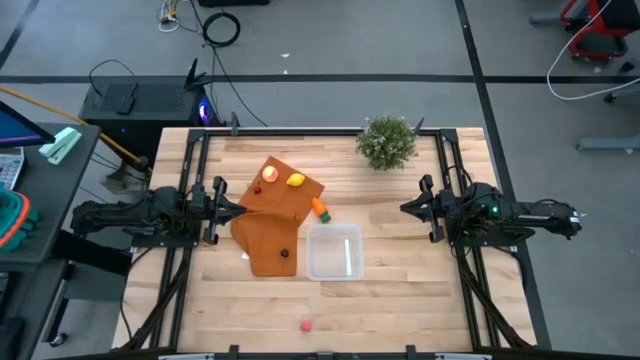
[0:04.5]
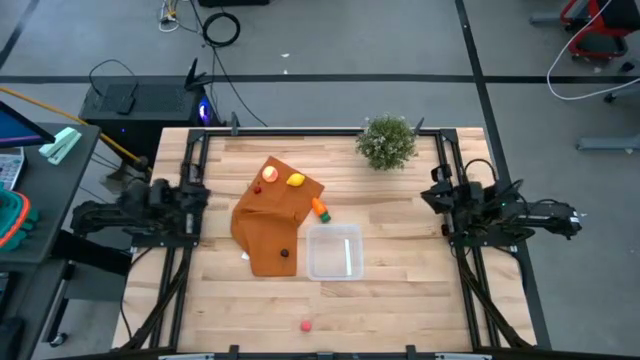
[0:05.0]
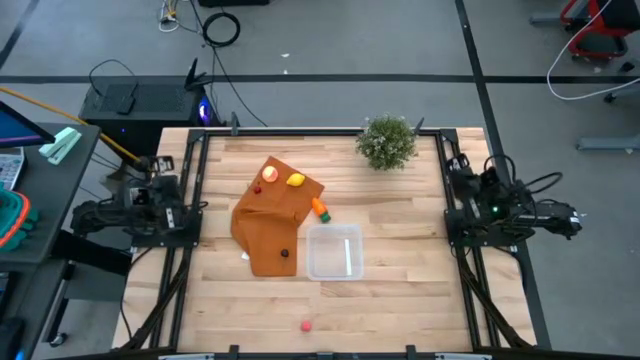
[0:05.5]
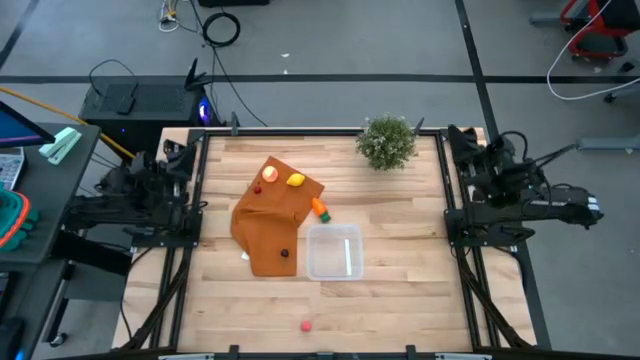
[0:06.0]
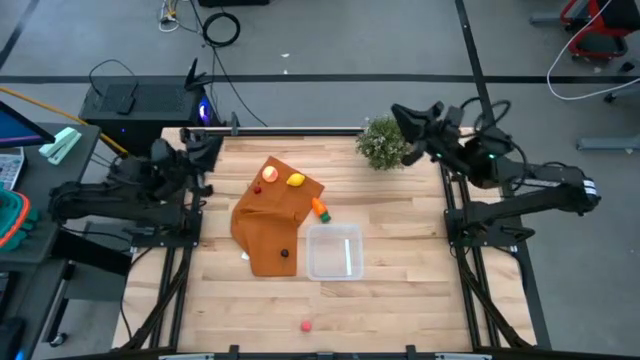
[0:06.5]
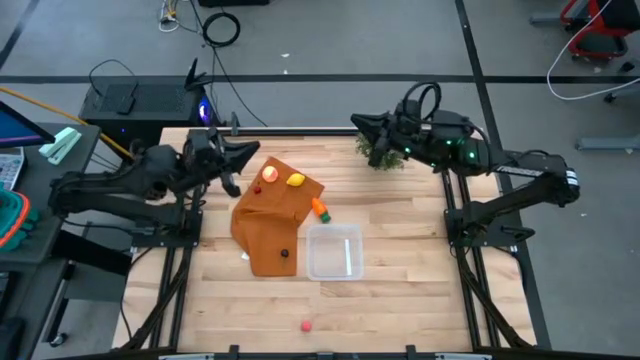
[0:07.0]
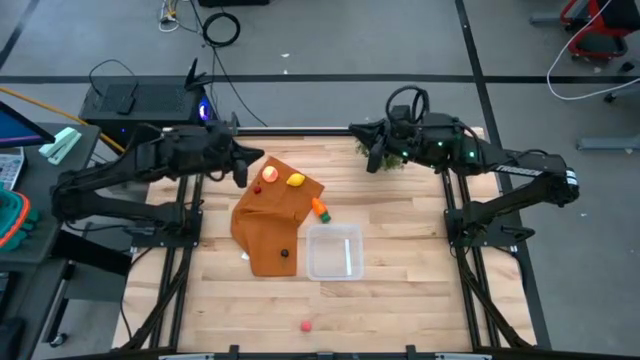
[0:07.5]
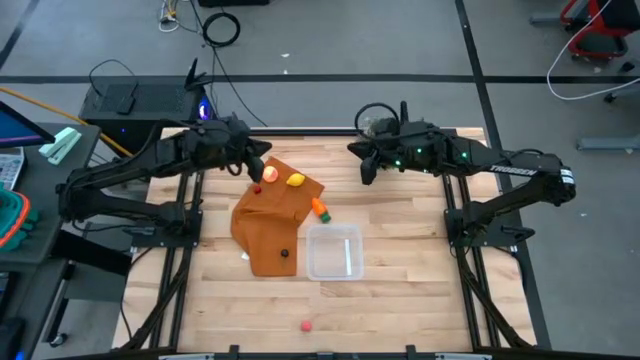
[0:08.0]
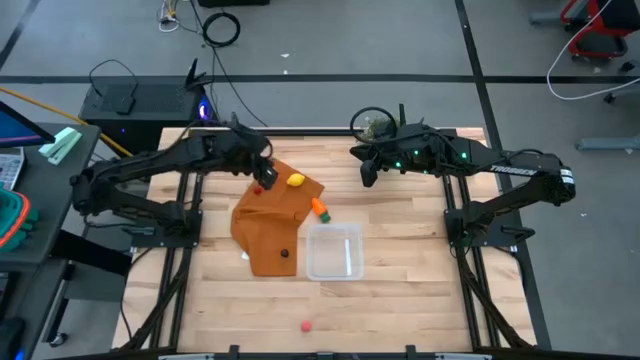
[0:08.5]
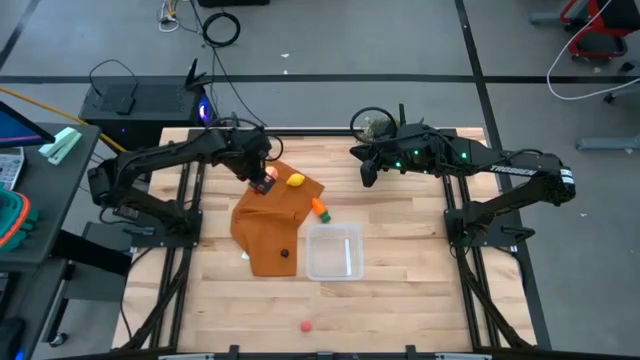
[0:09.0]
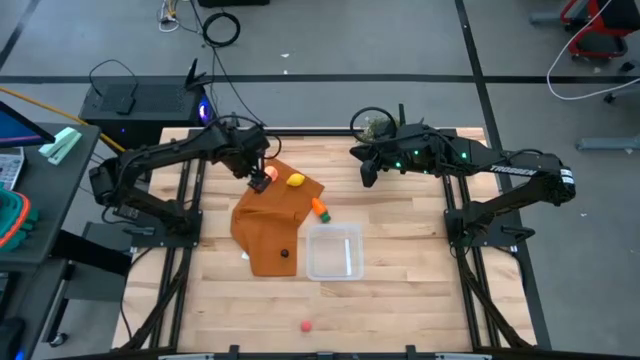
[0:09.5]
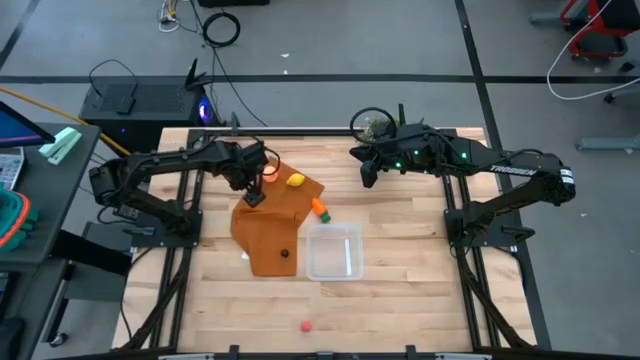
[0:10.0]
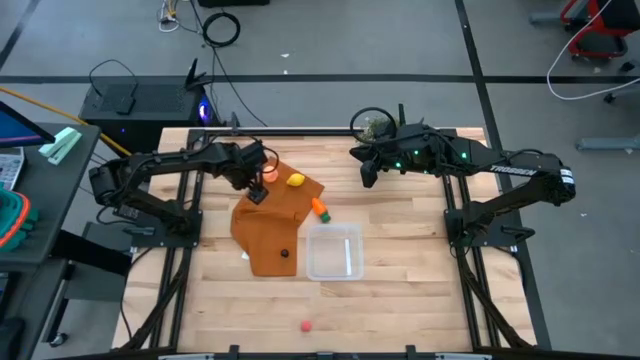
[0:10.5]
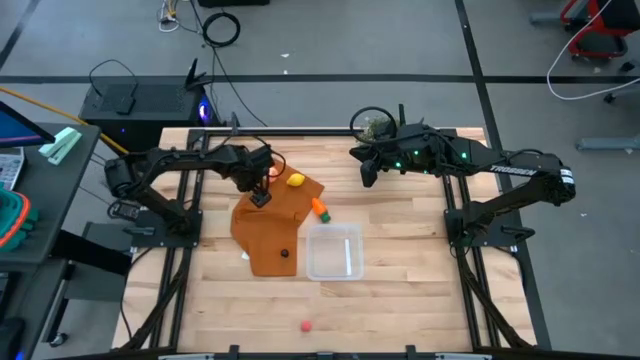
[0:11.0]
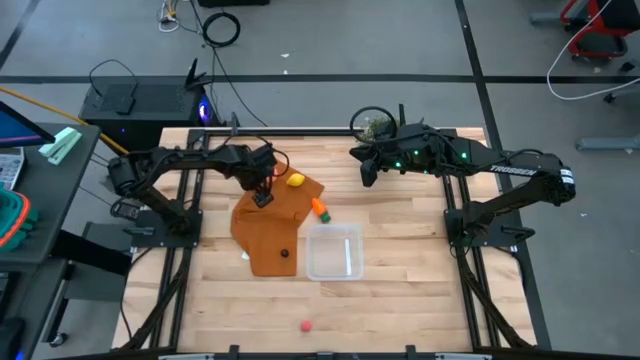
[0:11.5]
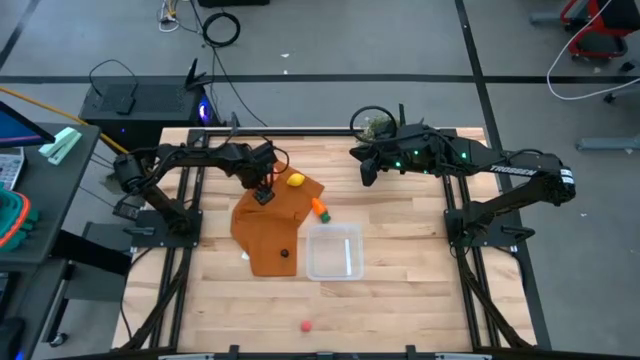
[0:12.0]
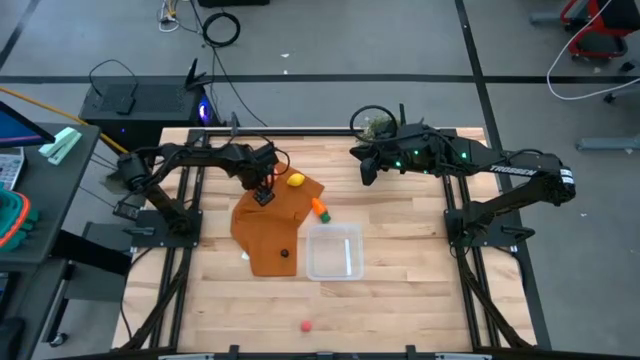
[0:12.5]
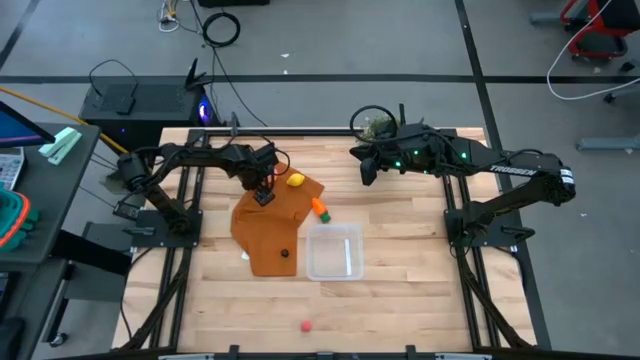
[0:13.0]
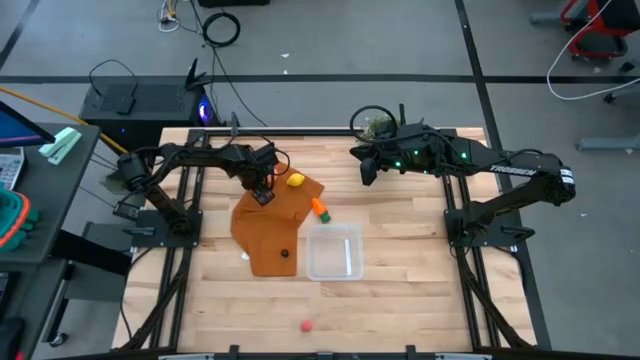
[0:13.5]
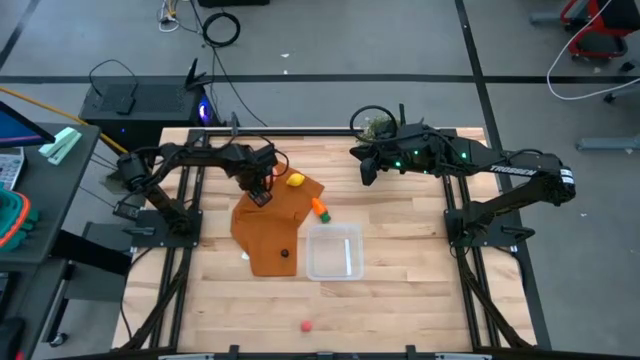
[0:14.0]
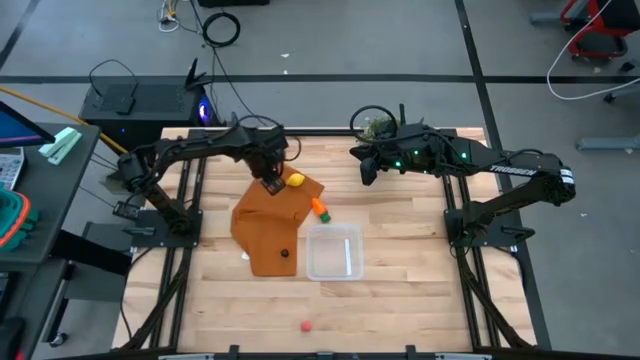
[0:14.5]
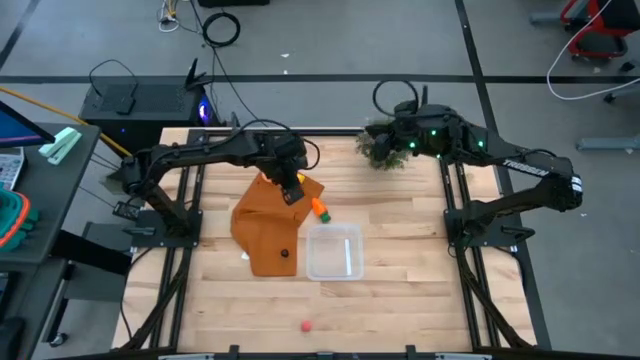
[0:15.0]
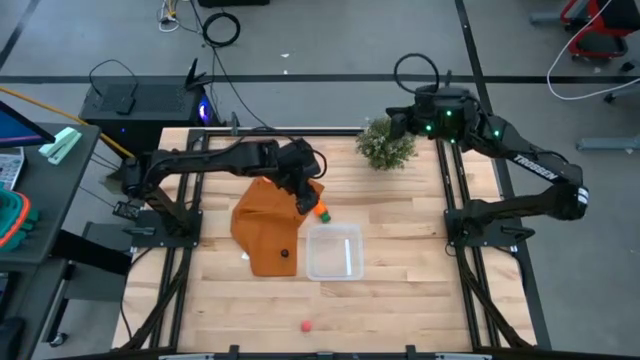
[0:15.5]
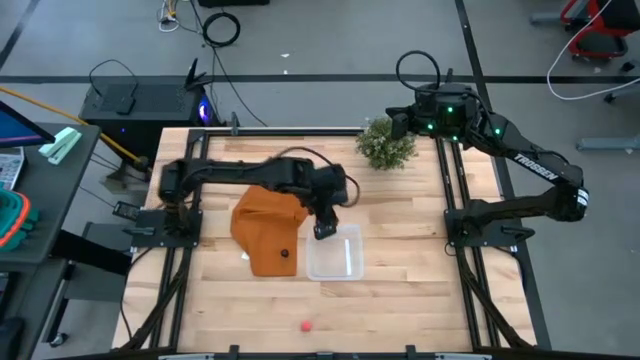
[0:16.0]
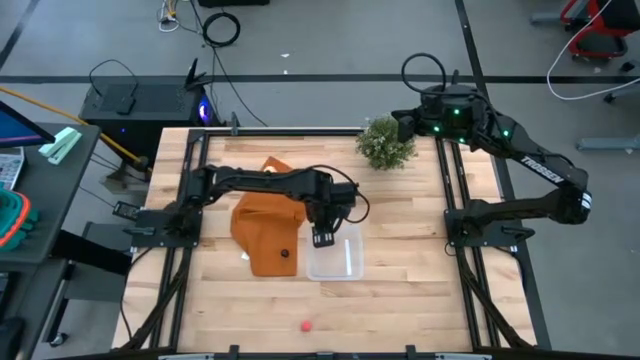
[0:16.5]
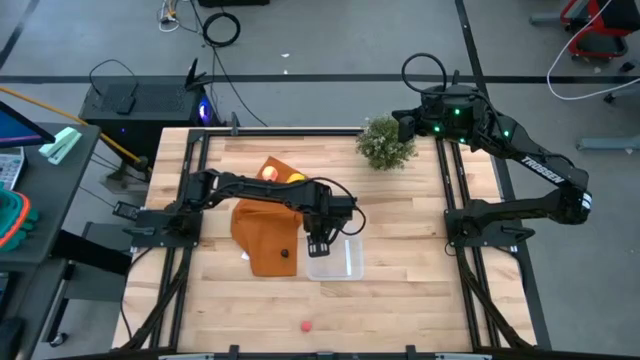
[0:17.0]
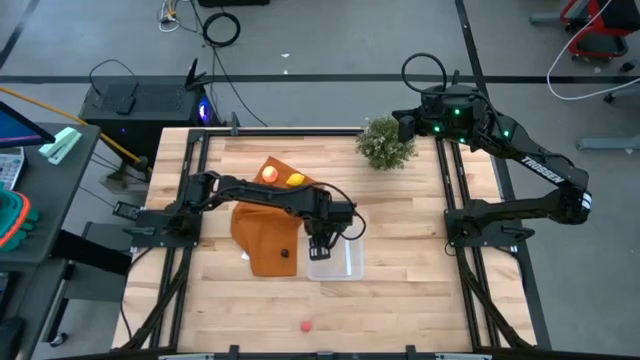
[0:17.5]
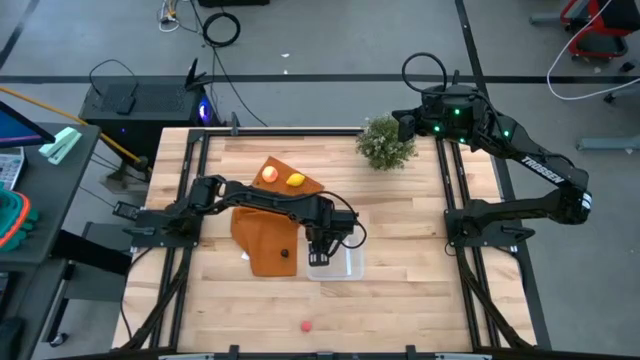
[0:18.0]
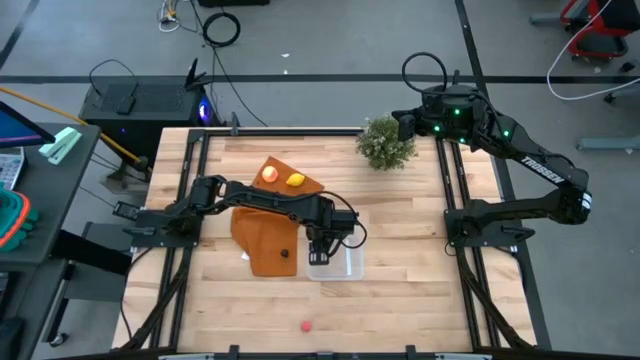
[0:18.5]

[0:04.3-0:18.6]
Task: Pick and placing Produce into tupperware
Put the red cherry into the transparent bin
